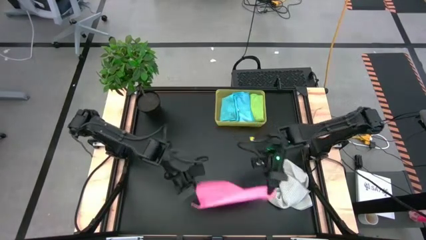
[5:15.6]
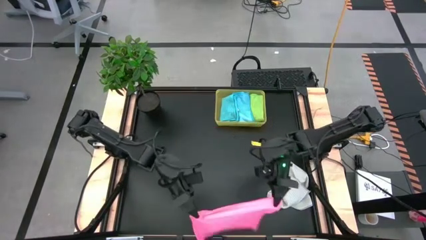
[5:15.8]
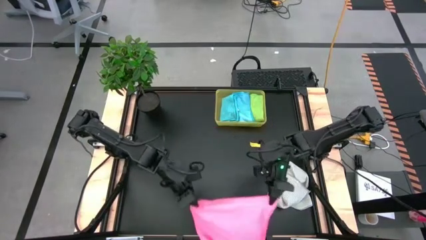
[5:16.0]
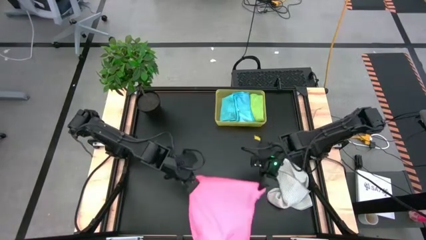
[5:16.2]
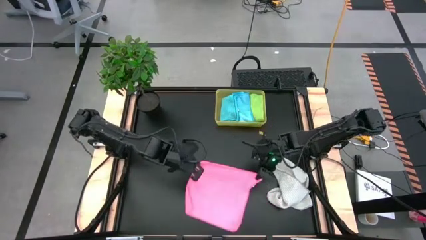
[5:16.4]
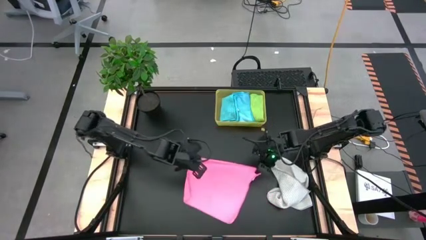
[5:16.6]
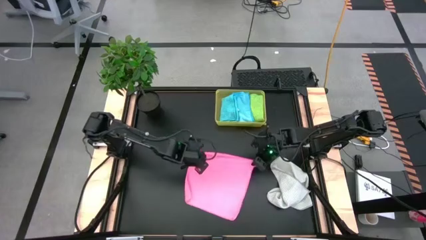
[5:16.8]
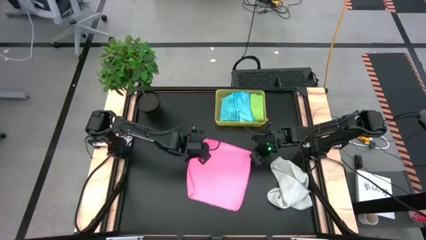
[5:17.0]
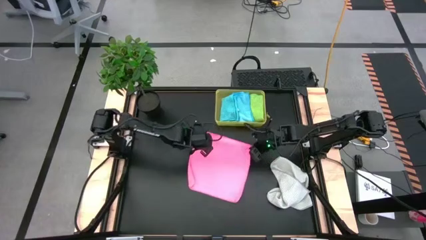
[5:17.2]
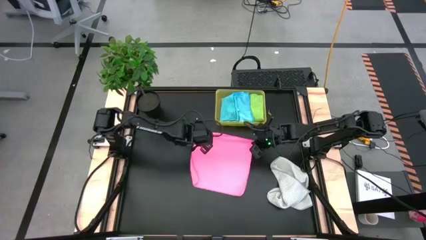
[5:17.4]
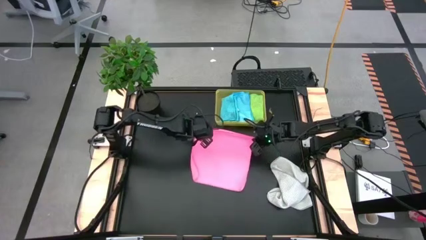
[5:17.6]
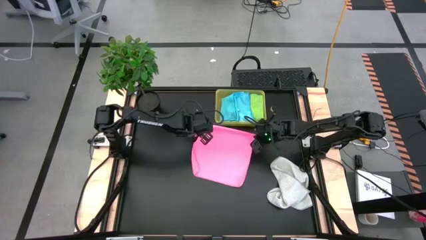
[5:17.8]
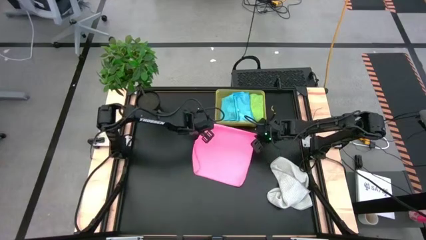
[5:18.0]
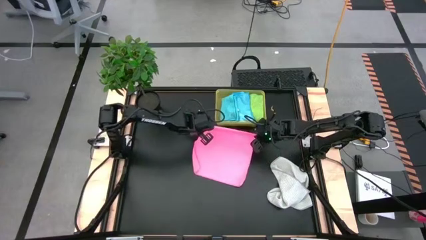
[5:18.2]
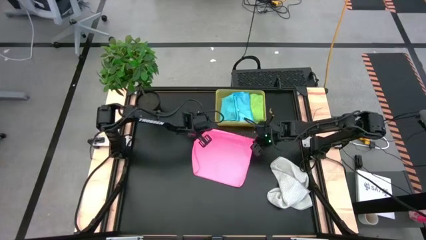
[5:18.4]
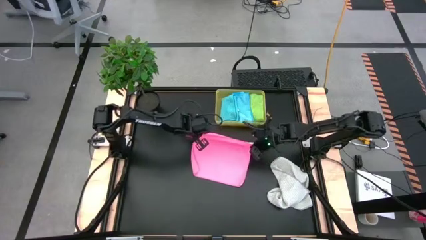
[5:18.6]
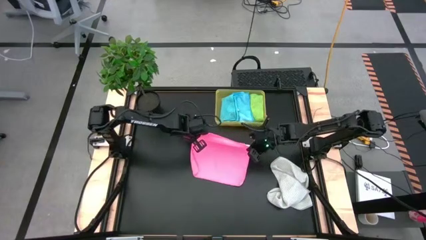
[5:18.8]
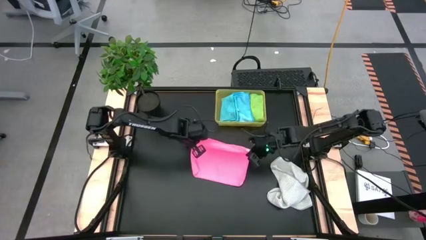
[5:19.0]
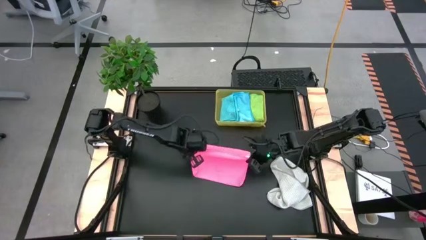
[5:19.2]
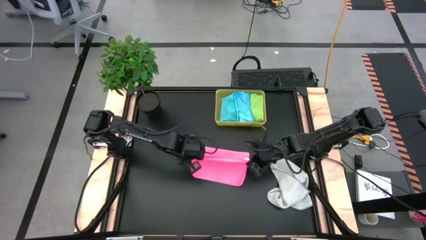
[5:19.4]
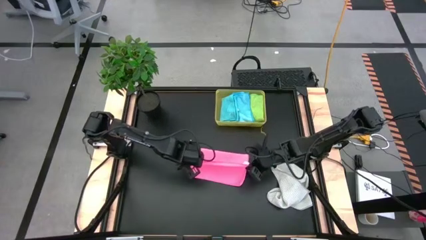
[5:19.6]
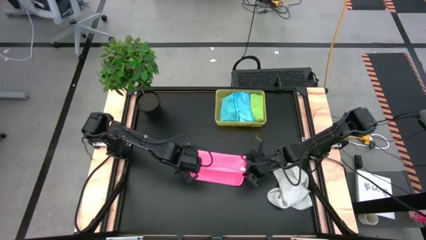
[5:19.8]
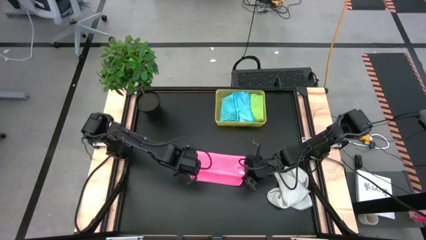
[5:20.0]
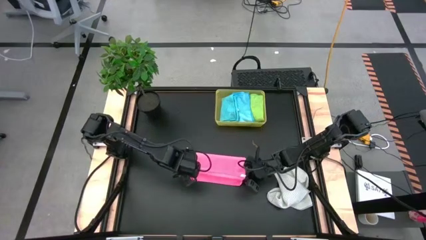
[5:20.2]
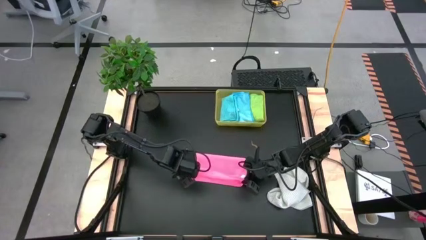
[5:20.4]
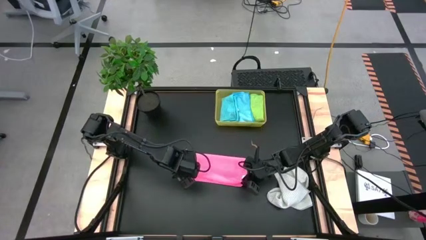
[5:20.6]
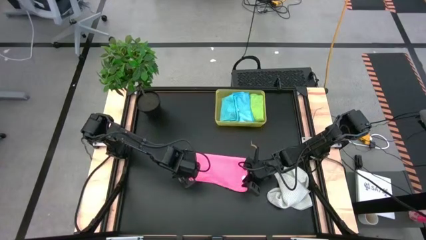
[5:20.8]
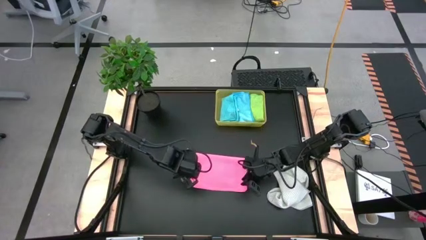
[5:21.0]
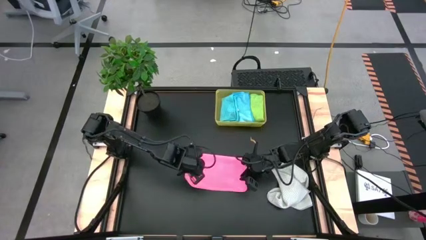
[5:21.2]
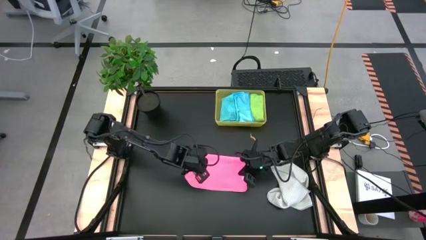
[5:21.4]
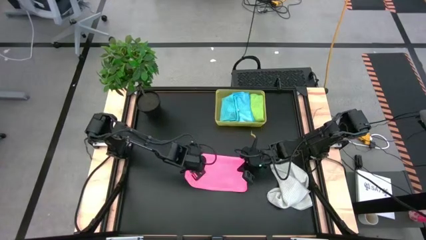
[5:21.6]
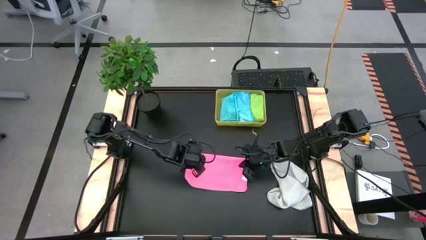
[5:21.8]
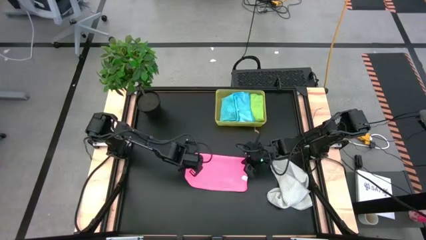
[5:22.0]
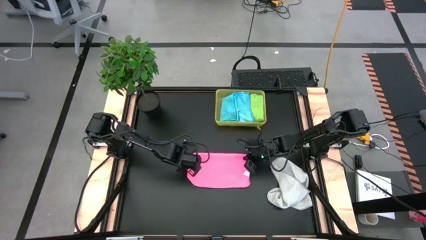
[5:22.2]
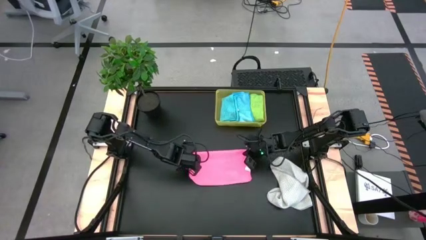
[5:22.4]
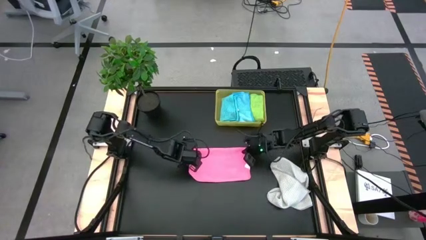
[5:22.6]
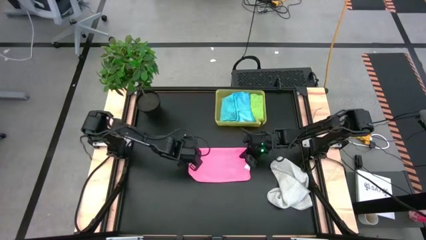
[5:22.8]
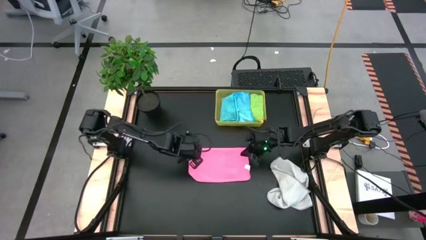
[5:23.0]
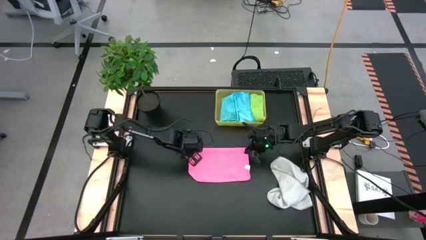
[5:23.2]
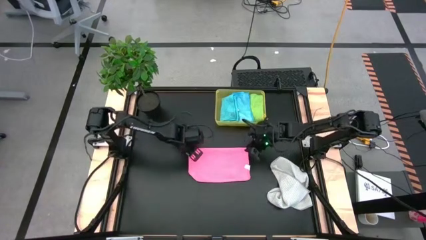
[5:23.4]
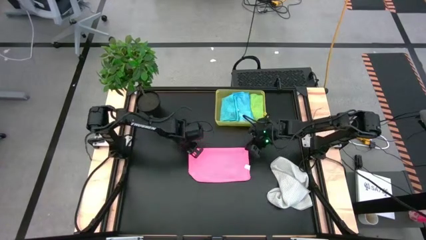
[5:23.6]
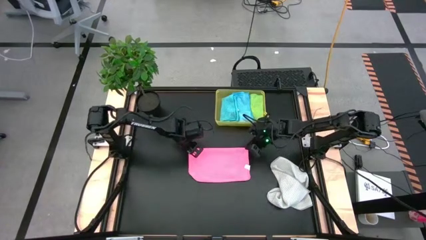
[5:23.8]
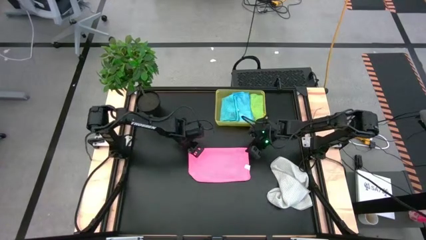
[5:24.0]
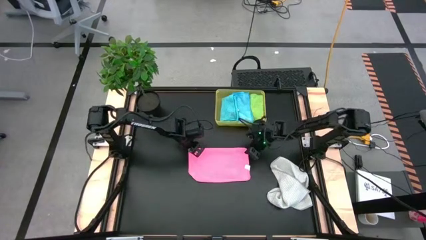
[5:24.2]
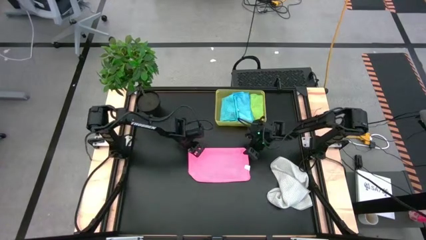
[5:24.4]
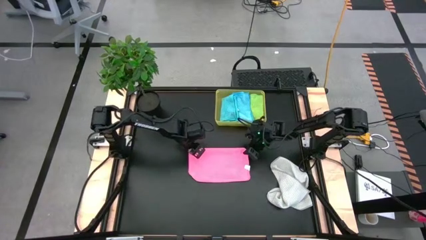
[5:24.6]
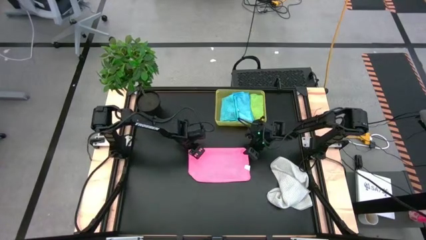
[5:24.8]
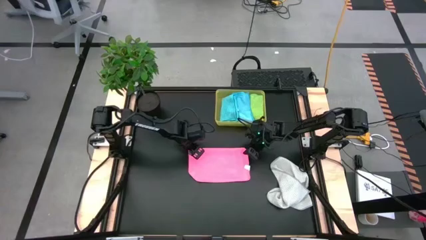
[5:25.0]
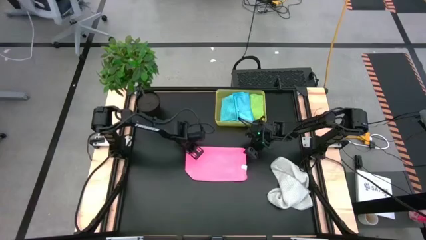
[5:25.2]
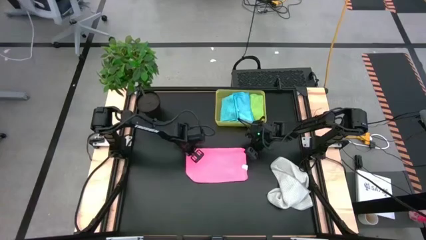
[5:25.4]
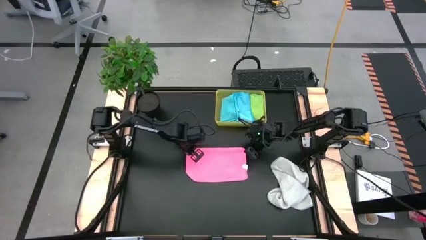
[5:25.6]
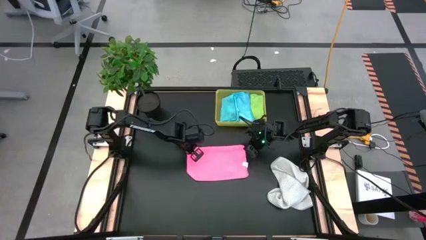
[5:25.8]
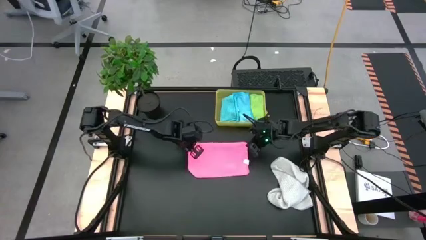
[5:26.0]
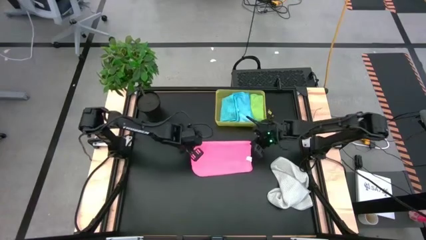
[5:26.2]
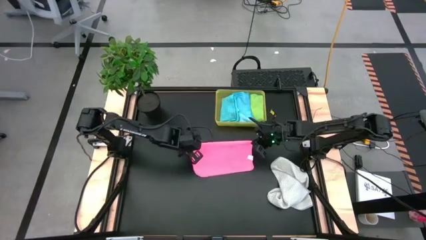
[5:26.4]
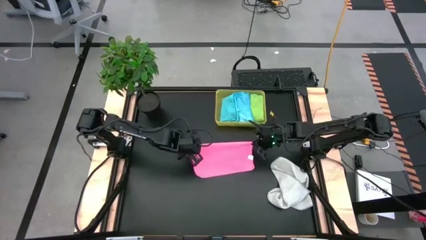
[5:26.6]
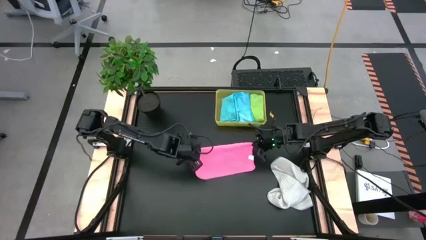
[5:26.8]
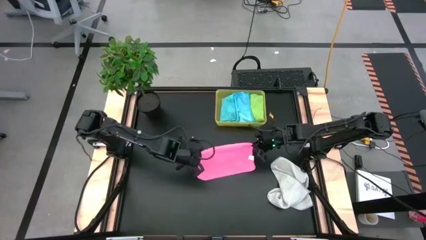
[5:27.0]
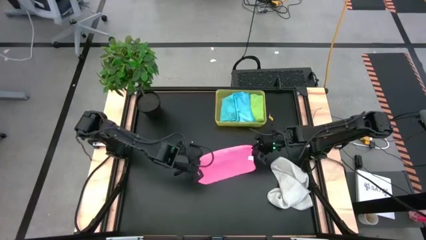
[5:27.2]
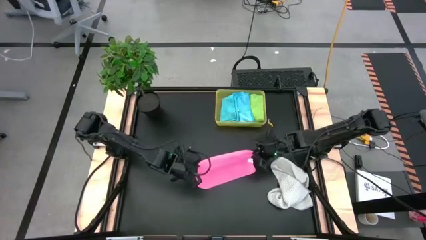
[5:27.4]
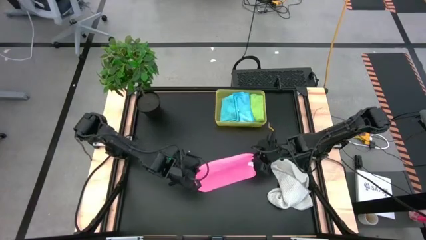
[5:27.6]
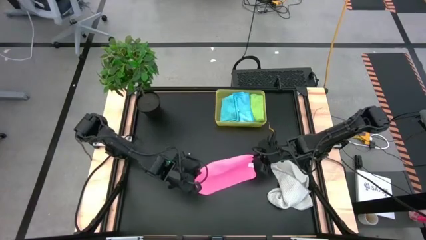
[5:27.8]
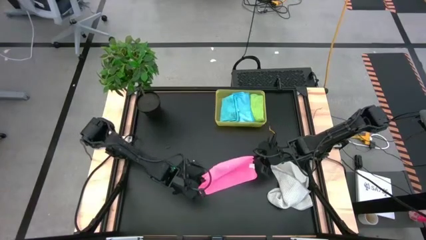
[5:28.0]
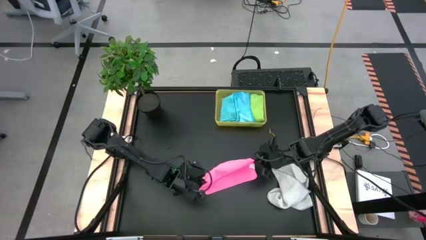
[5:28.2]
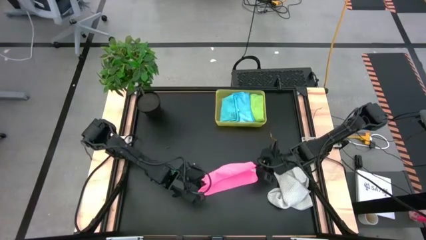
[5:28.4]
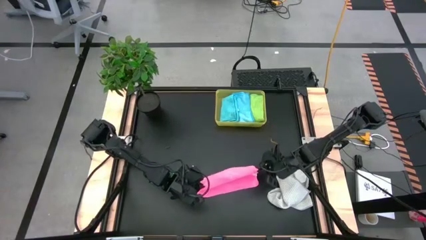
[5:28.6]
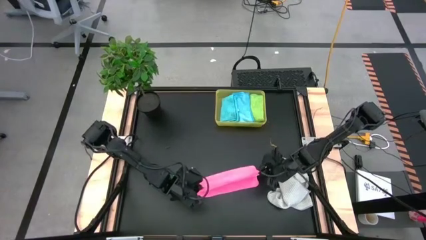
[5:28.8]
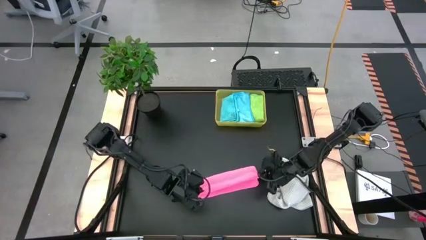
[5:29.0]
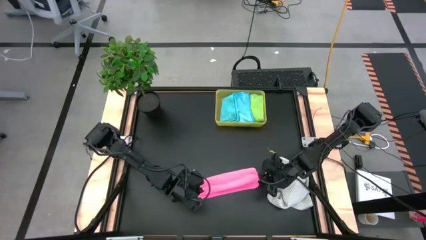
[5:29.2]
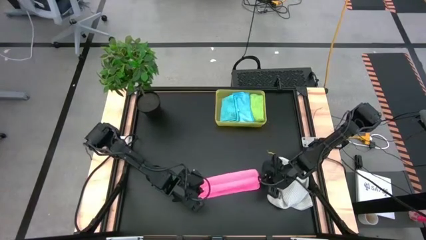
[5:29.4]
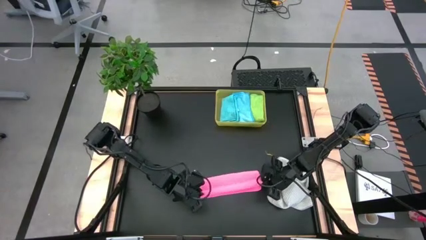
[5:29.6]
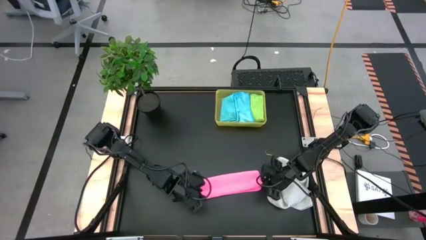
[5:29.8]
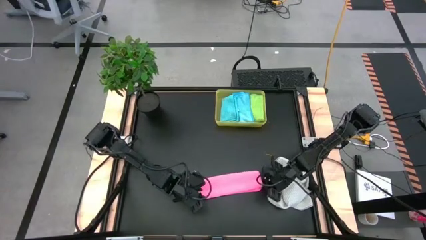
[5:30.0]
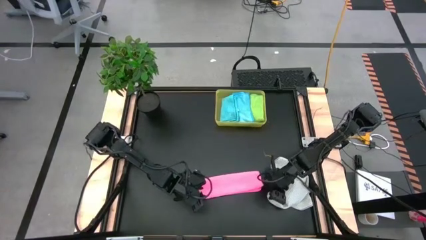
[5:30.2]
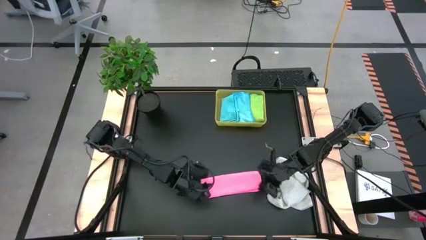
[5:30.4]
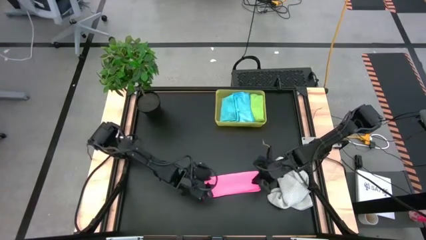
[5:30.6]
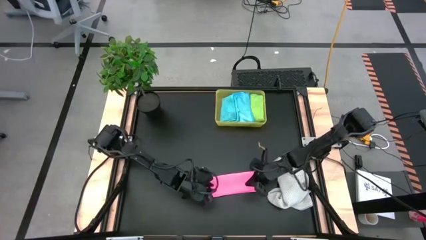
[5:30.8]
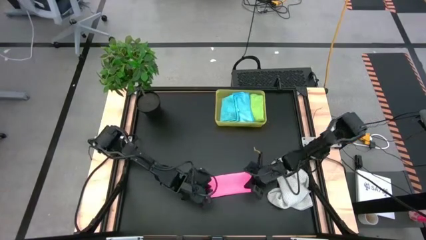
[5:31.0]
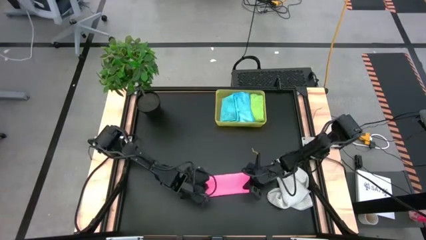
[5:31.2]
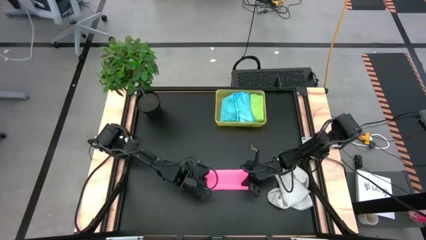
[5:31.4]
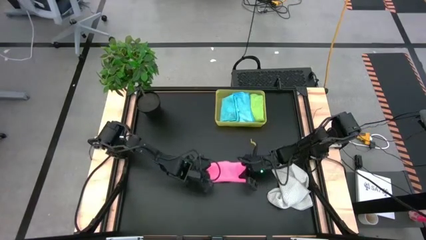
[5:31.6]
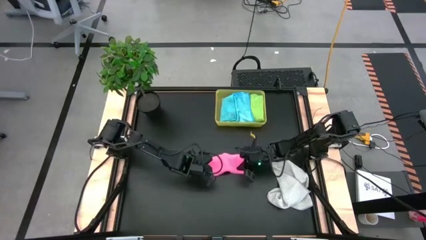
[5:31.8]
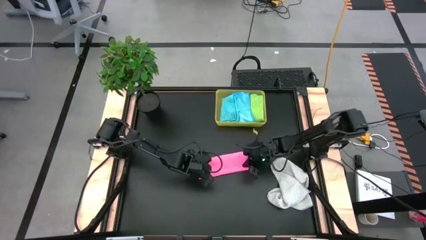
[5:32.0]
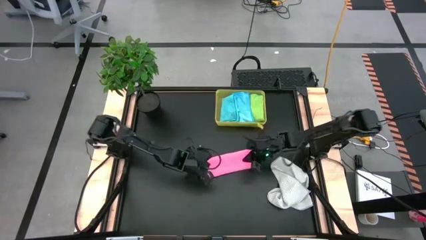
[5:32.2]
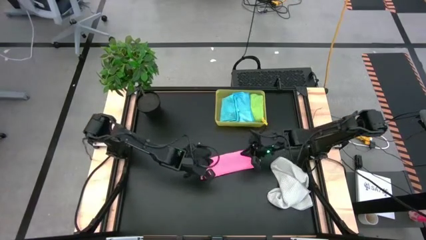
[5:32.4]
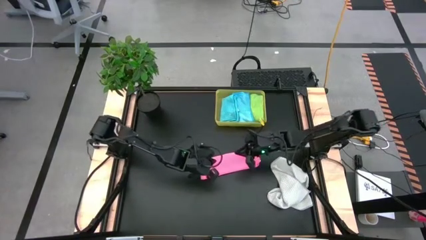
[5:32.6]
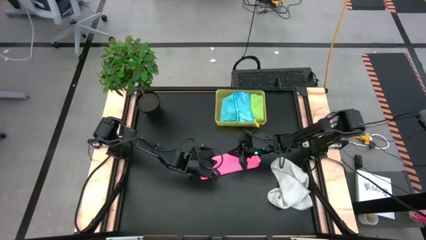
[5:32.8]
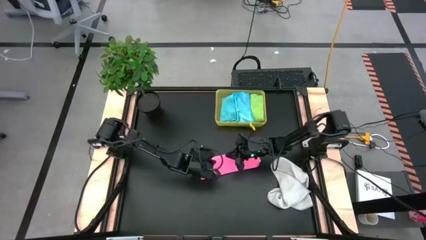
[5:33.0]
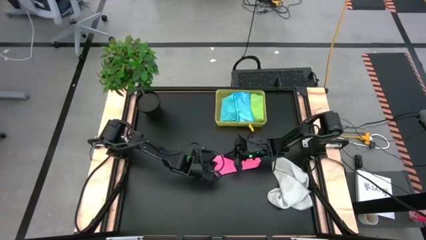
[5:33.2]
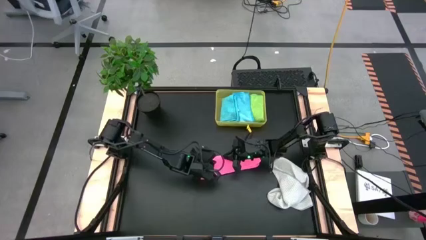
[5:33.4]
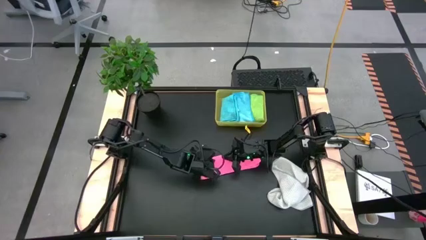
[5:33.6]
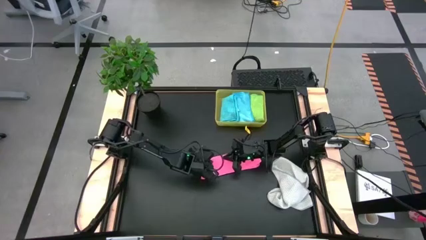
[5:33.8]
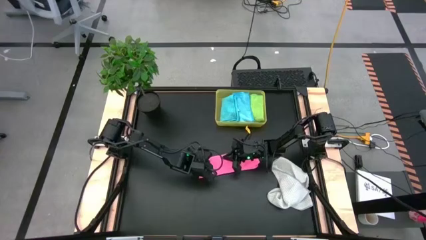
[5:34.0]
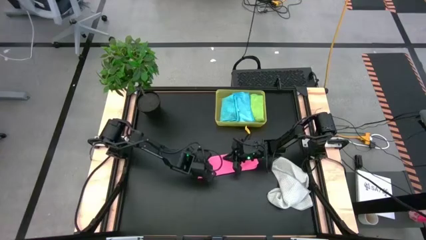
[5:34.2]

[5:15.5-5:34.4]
Task: Fold microfiber towels
Fold the pink microfiber cloth
